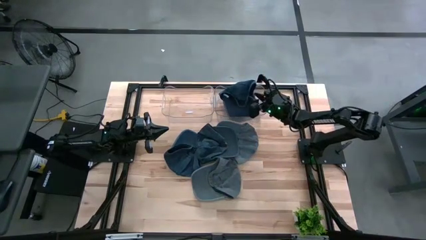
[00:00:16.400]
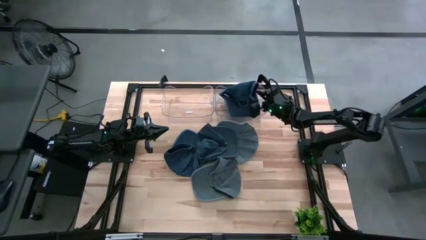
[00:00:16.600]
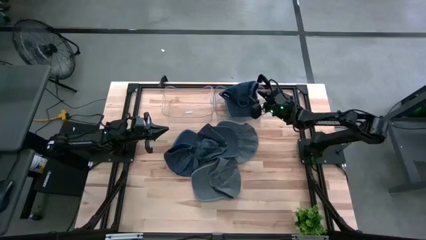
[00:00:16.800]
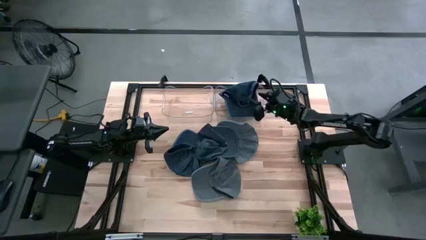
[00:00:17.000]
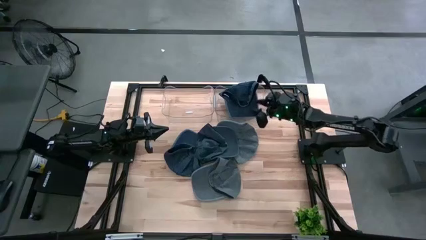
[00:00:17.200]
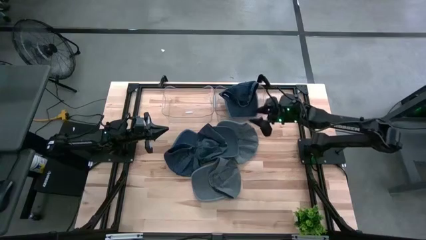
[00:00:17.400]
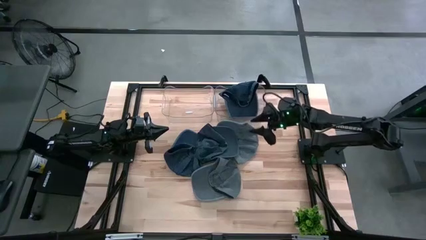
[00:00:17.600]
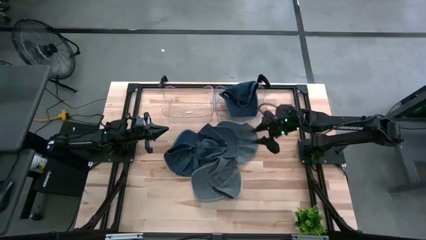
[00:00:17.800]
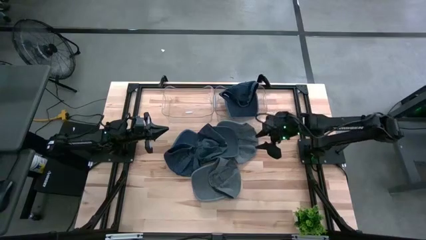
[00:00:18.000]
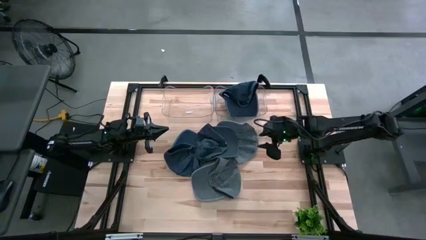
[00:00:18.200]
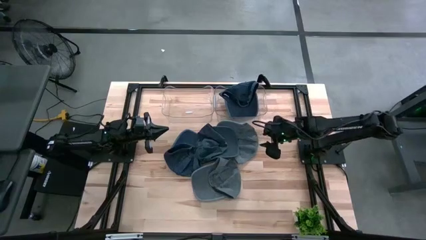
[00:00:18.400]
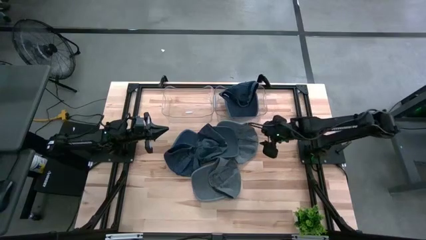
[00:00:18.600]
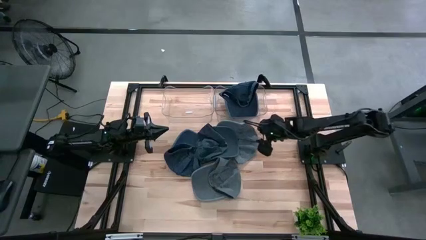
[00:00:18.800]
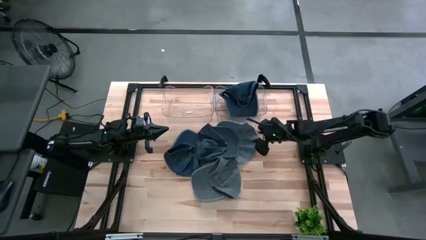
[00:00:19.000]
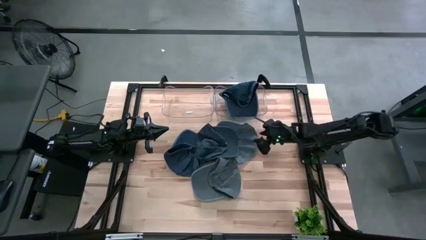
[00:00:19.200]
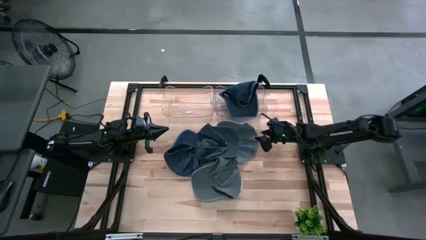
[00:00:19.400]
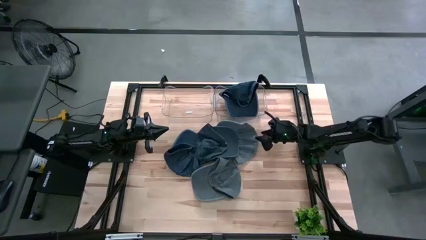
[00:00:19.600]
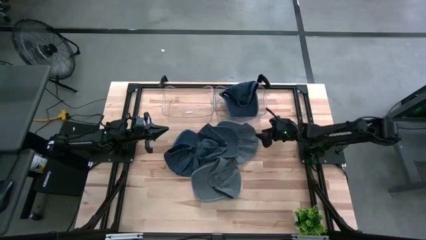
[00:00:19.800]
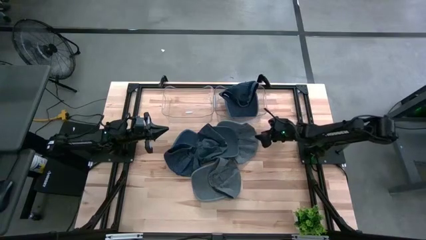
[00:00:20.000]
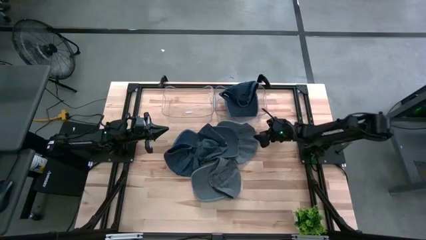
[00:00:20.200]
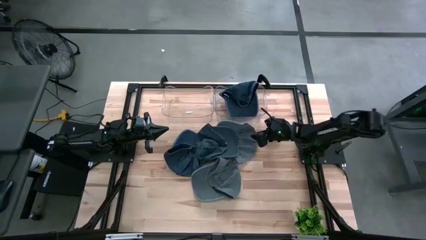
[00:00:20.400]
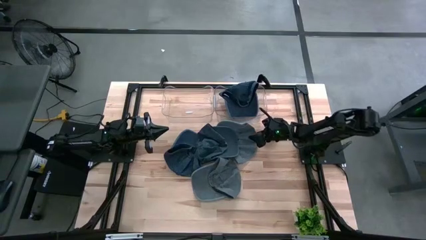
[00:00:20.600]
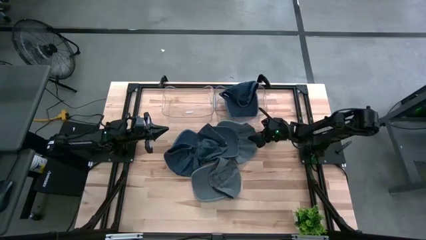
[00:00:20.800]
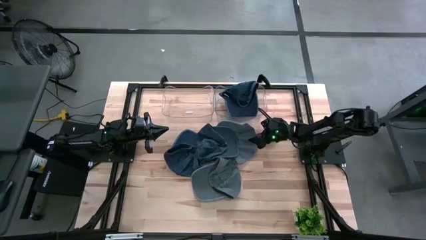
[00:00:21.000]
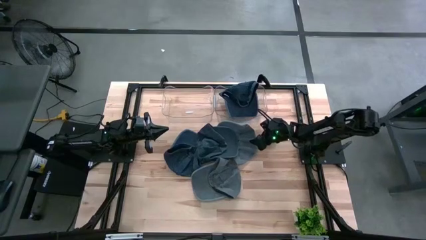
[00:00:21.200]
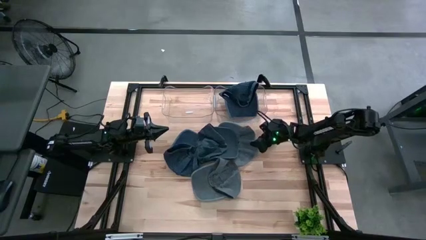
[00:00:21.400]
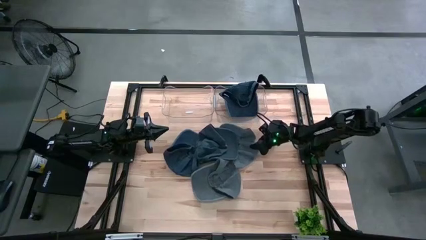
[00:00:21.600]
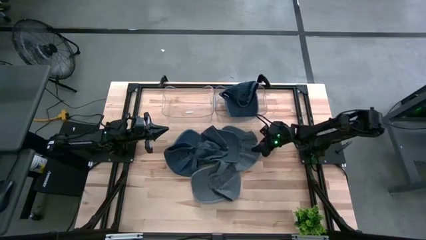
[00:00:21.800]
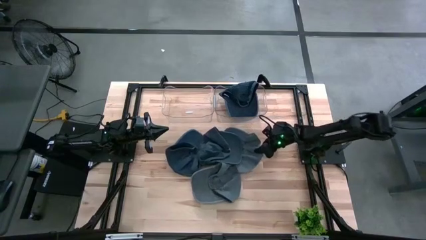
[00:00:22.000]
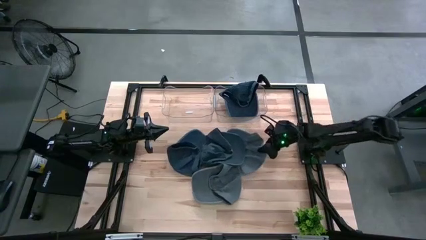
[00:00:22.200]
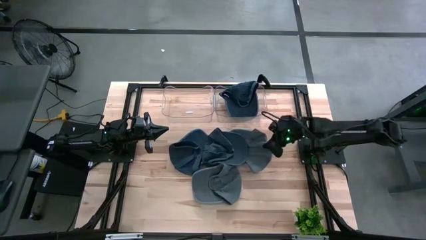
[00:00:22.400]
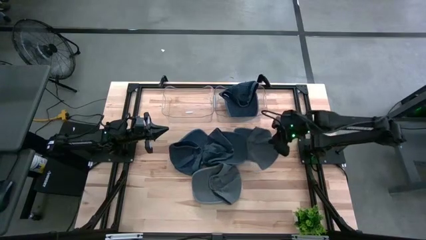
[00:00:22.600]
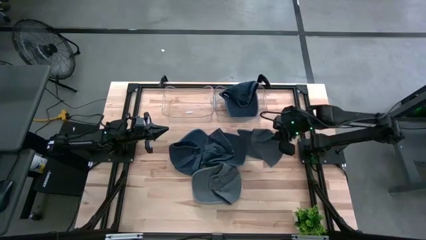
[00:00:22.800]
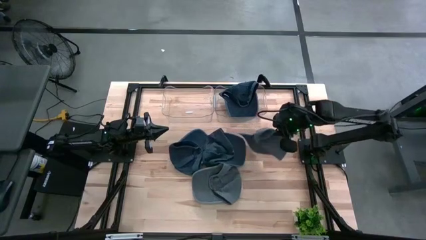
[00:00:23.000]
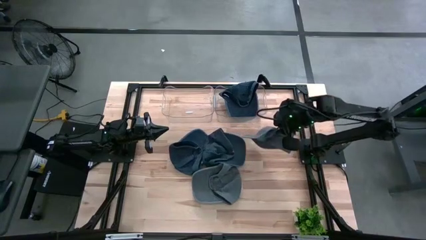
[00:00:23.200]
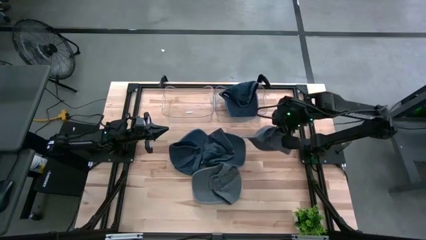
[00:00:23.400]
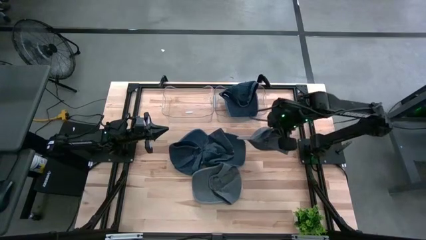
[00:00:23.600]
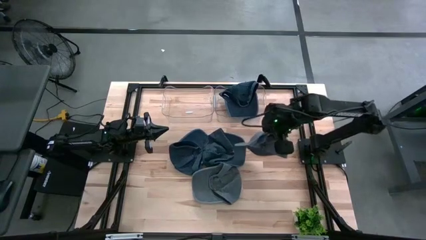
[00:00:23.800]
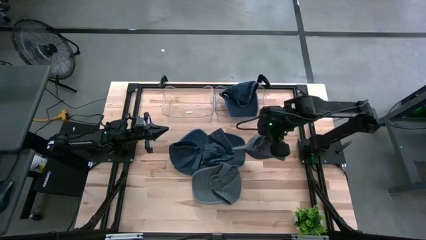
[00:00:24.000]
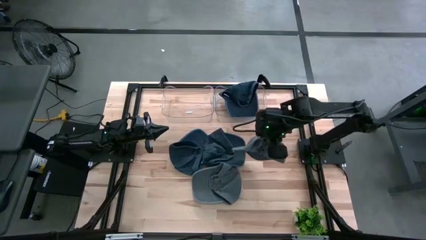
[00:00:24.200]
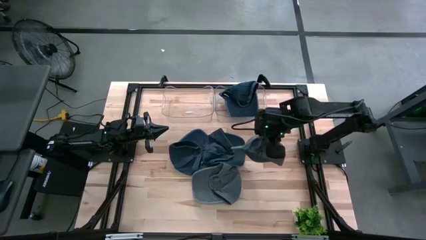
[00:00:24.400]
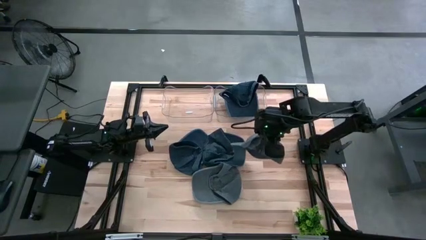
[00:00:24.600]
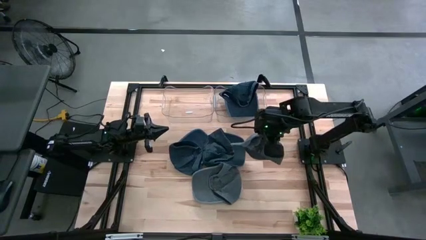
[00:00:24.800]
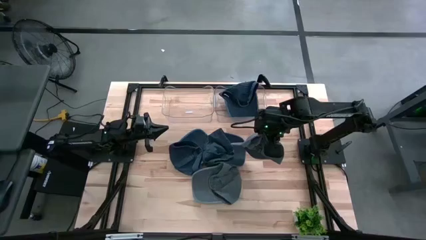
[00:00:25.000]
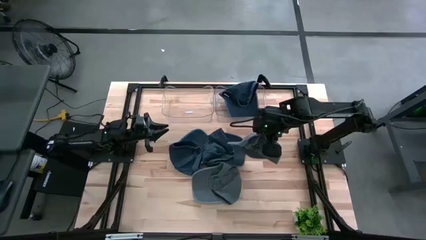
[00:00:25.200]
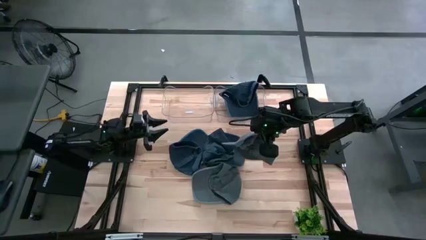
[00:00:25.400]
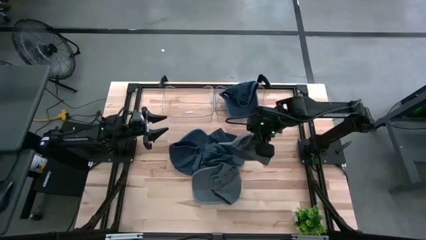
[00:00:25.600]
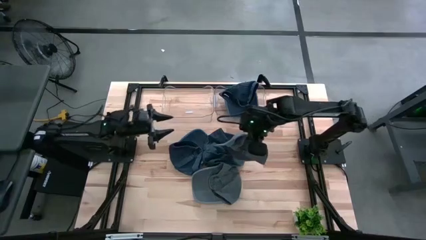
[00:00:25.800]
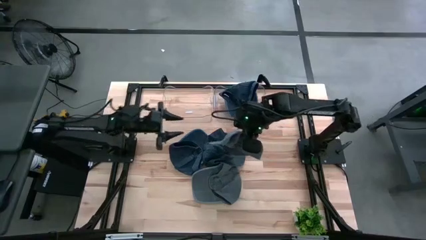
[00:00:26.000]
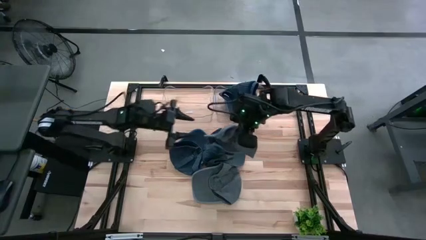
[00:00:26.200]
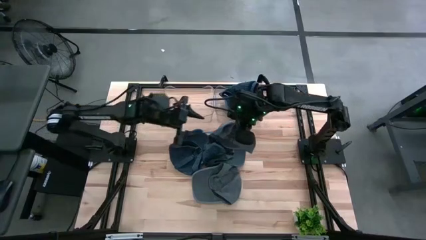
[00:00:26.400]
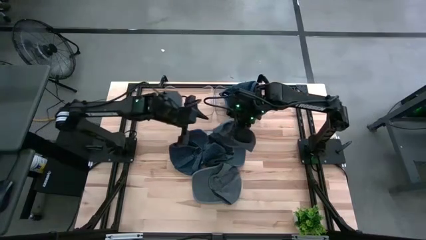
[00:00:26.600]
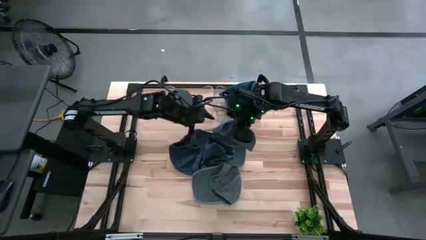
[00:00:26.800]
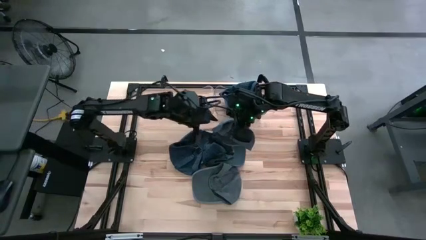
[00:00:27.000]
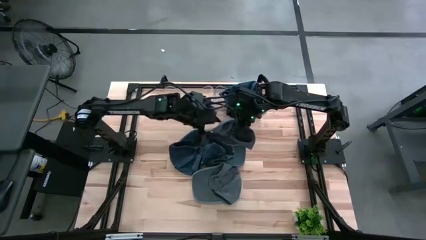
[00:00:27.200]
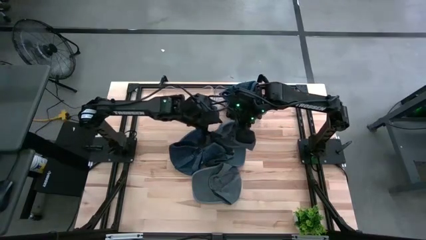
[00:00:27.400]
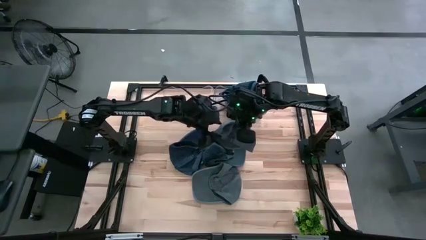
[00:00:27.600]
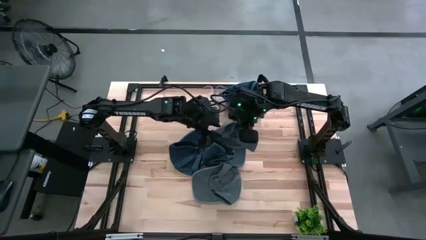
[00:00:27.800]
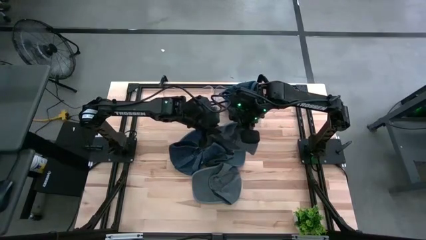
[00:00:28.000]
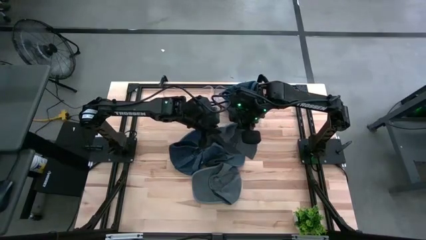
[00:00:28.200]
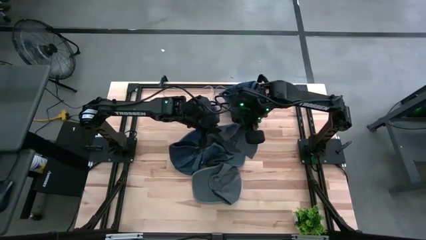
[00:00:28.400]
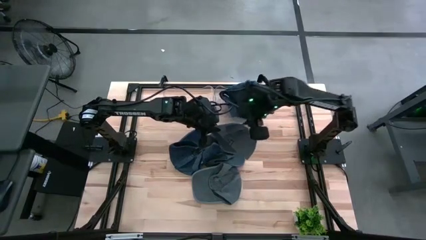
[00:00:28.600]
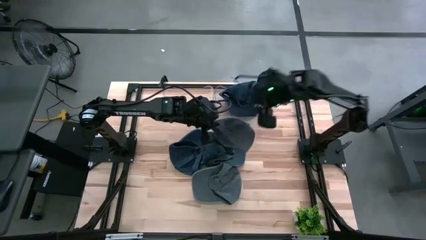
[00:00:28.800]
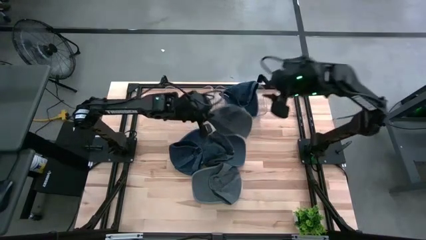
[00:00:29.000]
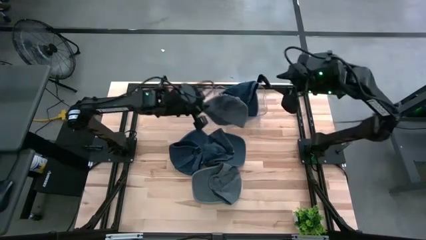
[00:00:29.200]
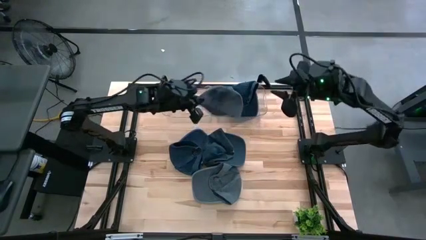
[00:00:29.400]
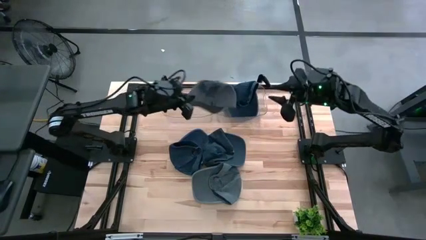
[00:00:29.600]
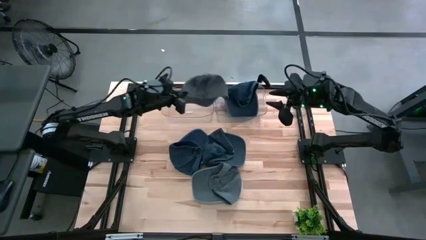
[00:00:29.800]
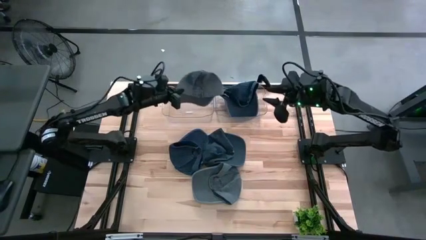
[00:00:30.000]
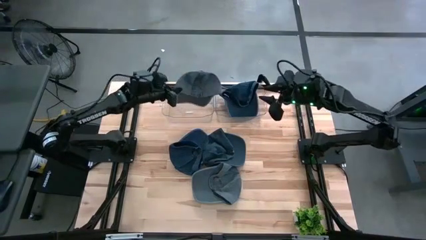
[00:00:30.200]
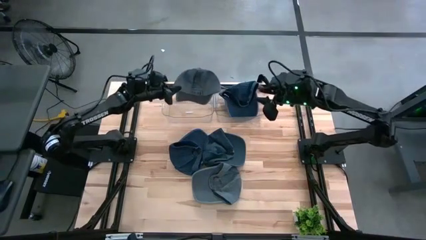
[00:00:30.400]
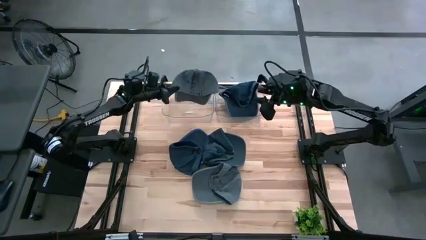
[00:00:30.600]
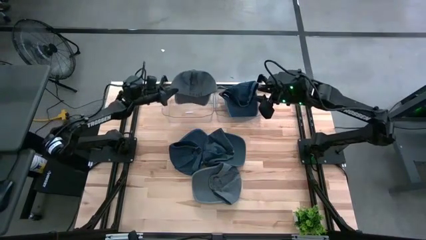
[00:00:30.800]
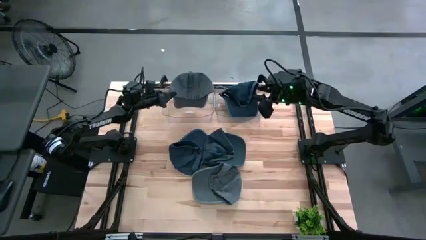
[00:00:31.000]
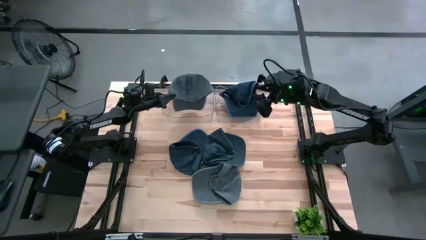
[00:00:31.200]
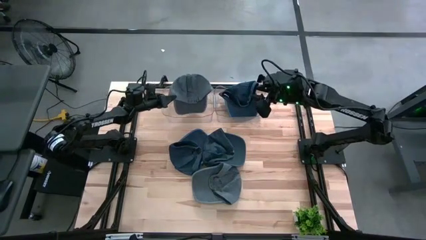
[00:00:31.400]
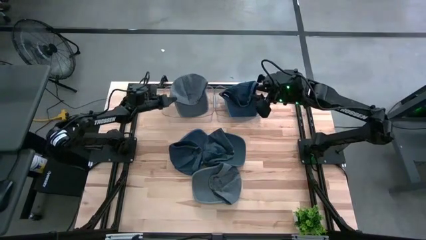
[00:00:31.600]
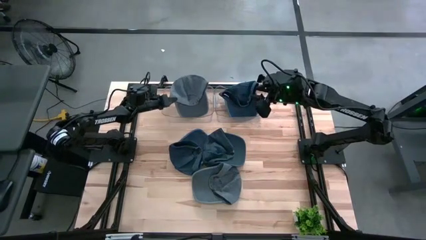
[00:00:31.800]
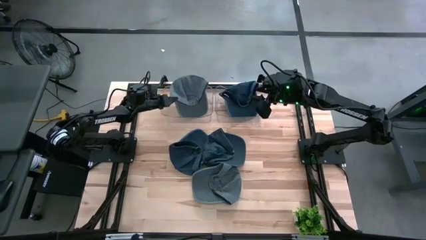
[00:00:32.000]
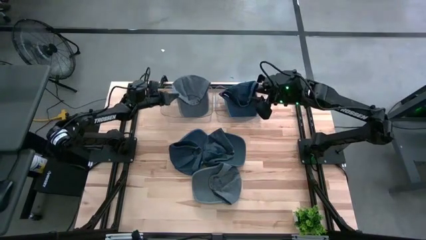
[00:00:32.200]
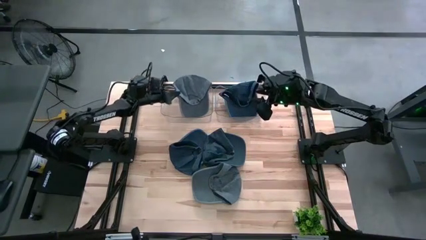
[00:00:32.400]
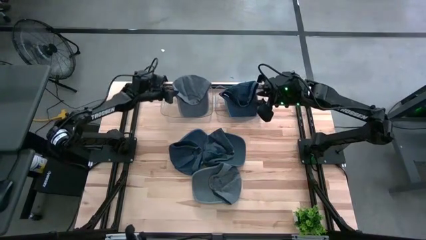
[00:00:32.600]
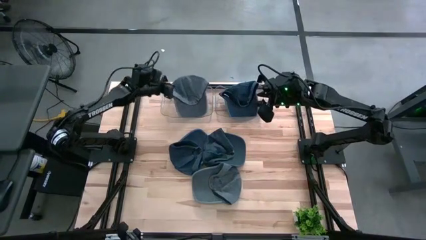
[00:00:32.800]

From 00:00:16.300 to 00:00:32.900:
Task: Pick & Place hat
Put the gray cap into the left transparent bin
